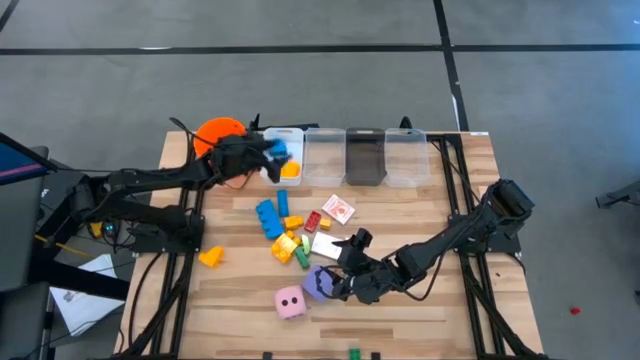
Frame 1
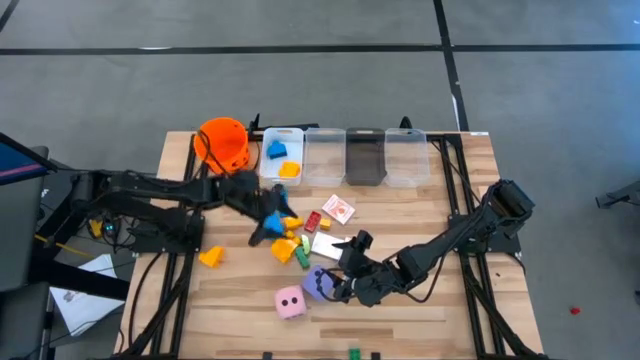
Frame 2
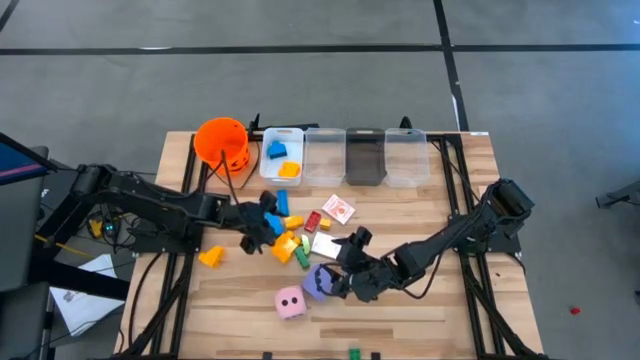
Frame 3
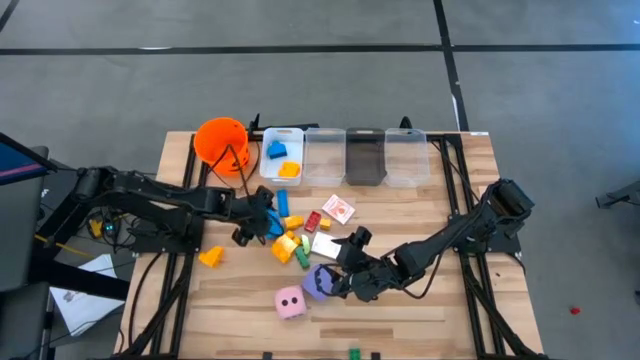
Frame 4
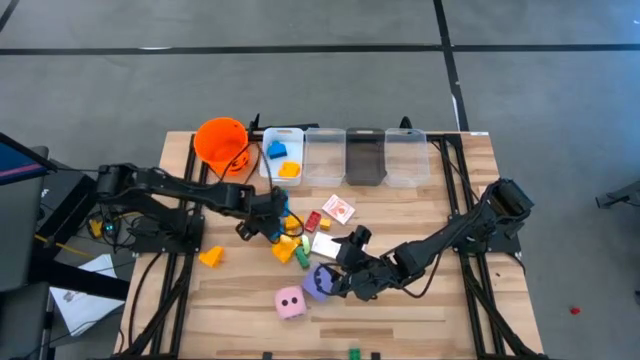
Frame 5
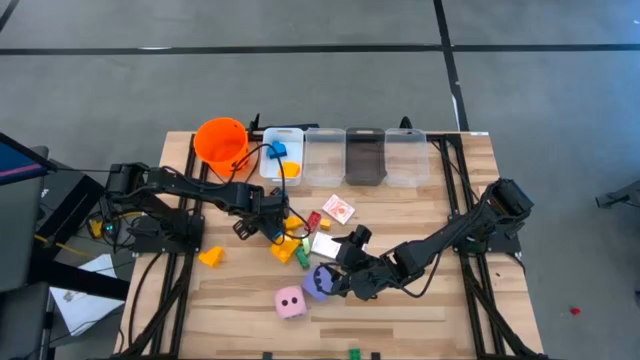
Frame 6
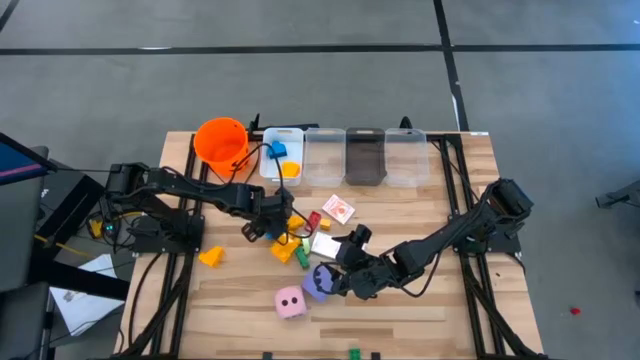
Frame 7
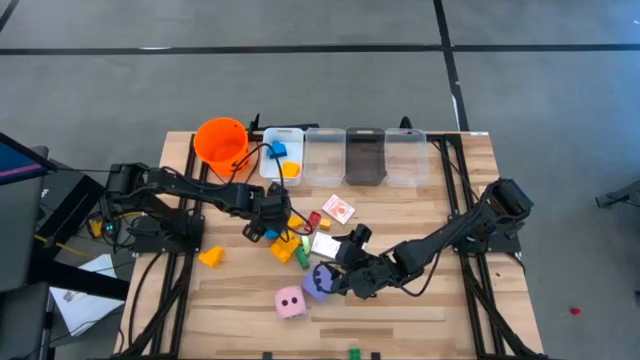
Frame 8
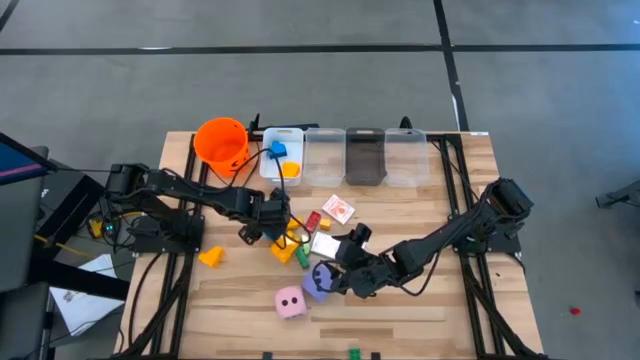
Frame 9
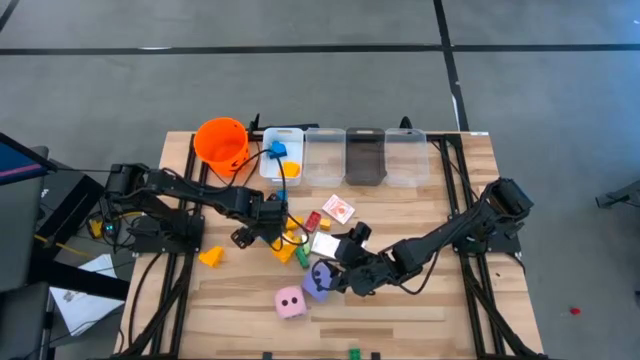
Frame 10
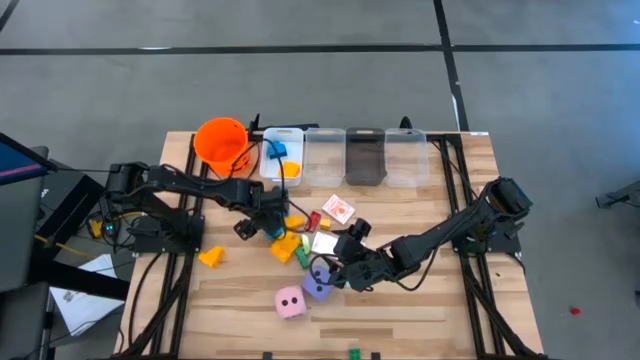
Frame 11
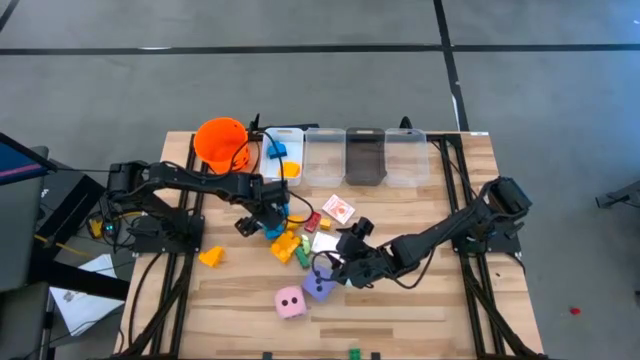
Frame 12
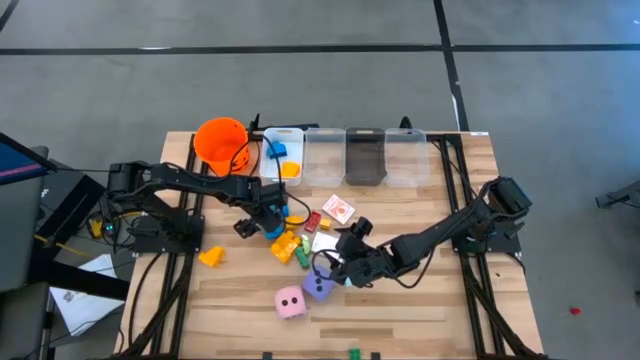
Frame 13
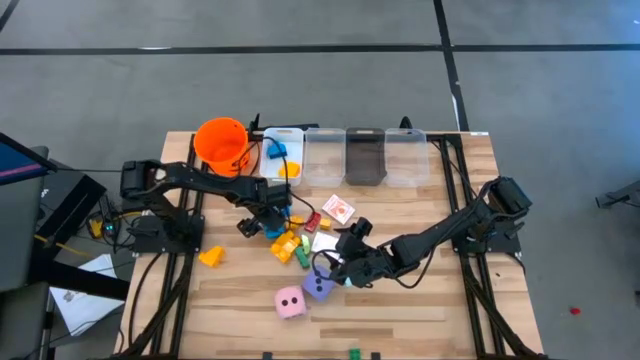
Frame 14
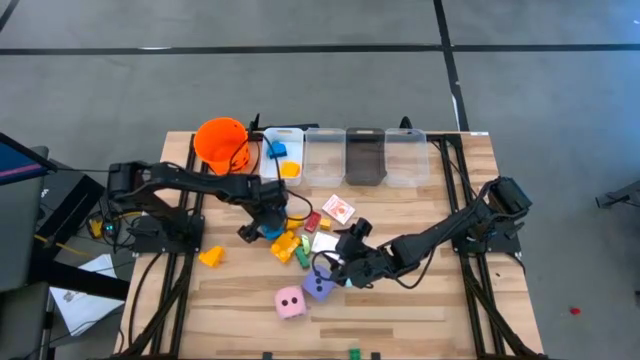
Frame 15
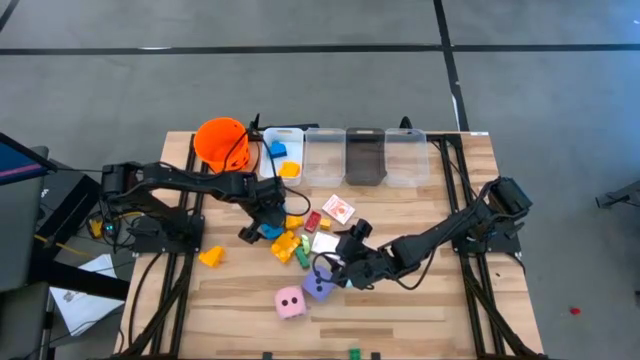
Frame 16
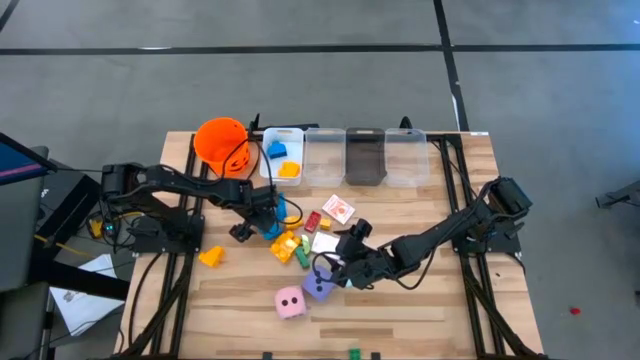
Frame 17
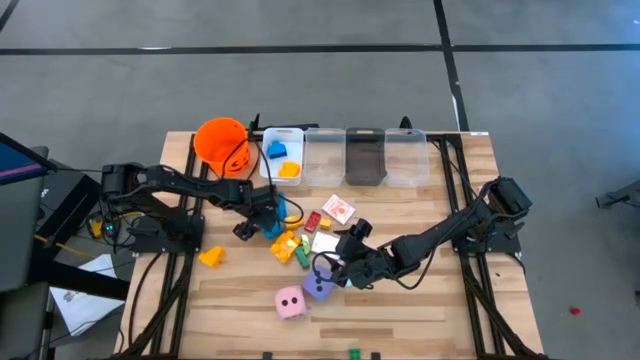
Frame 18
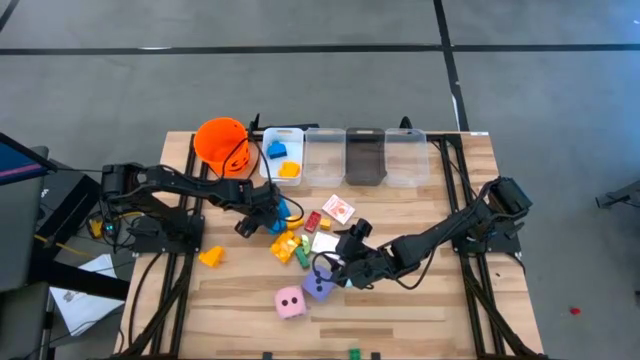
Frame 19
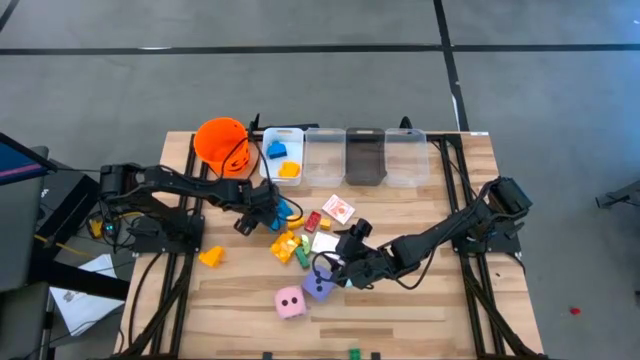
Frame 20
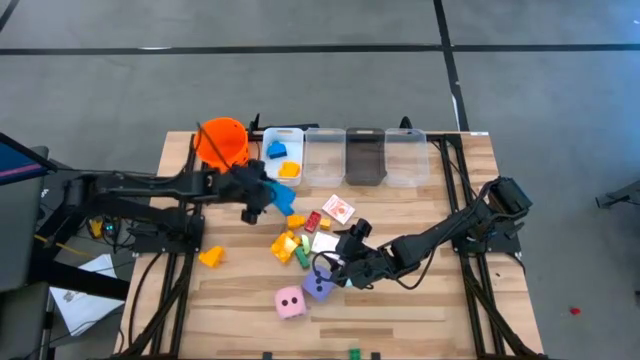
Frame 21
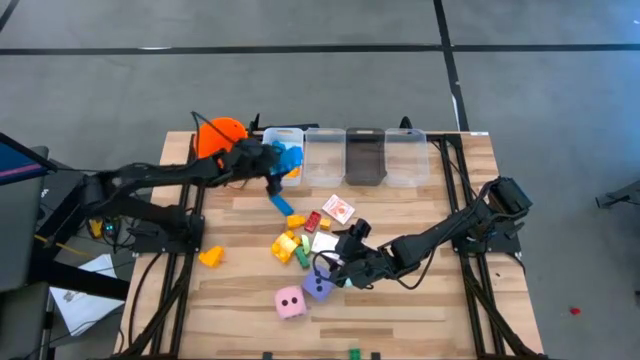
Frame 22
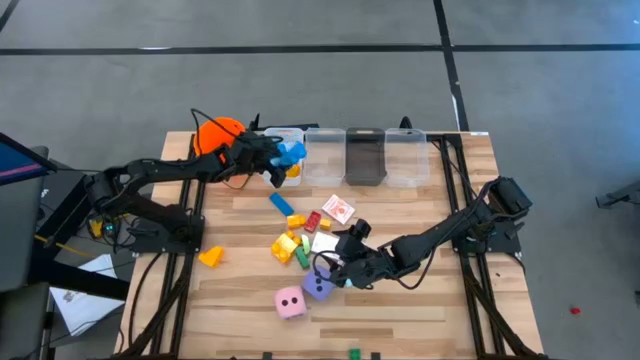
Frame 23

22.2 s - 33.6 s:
Task: Pick & Place Toys
Put the big blue game piece into the white bin

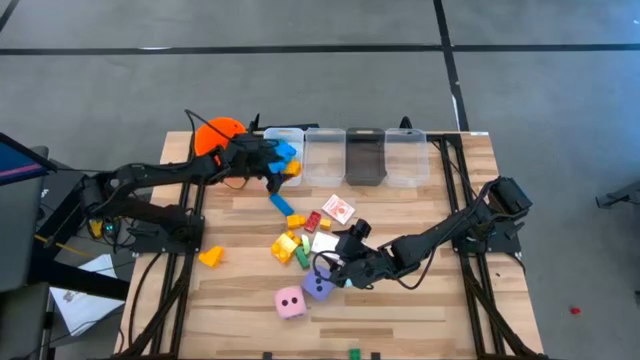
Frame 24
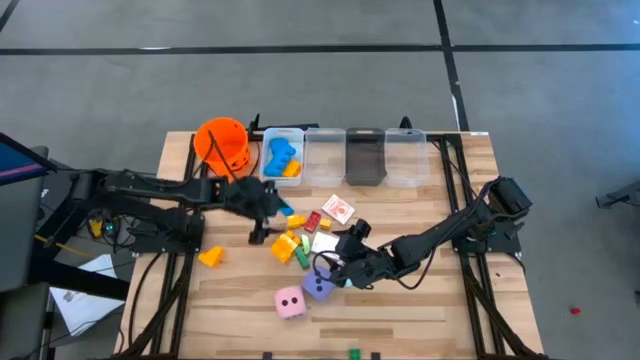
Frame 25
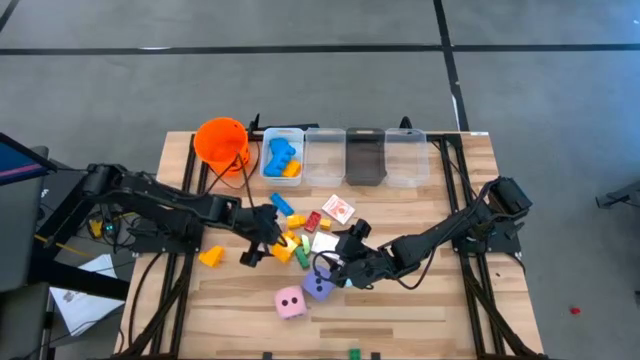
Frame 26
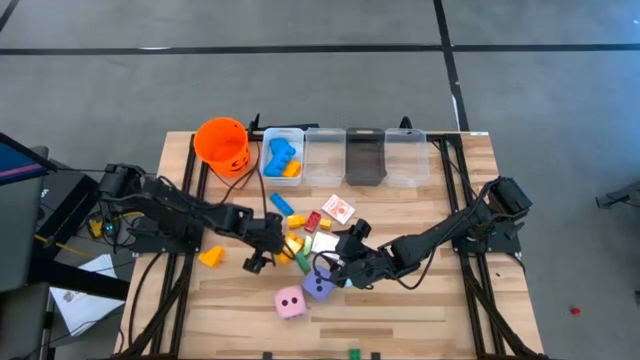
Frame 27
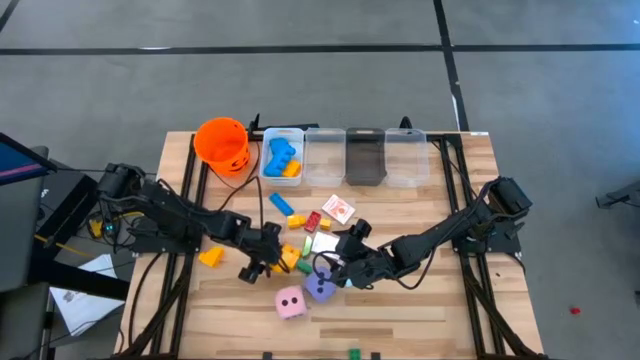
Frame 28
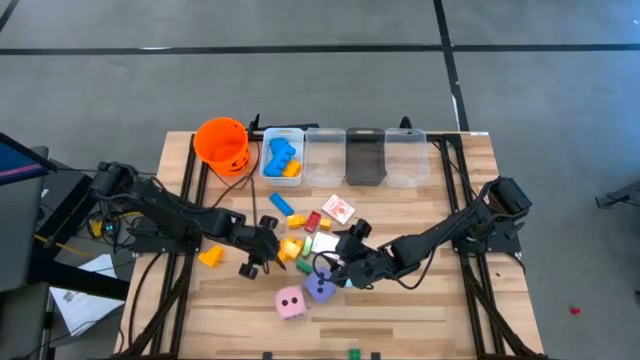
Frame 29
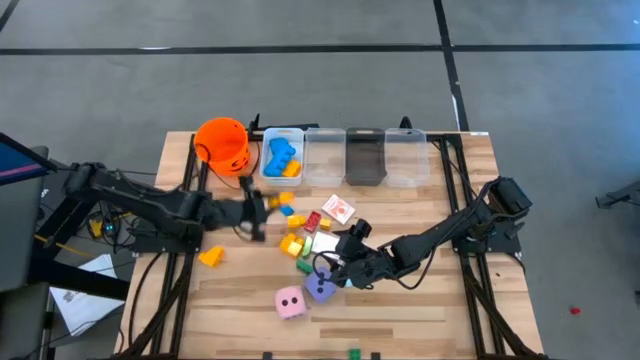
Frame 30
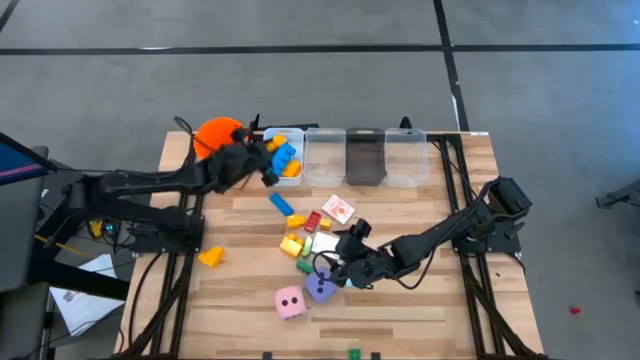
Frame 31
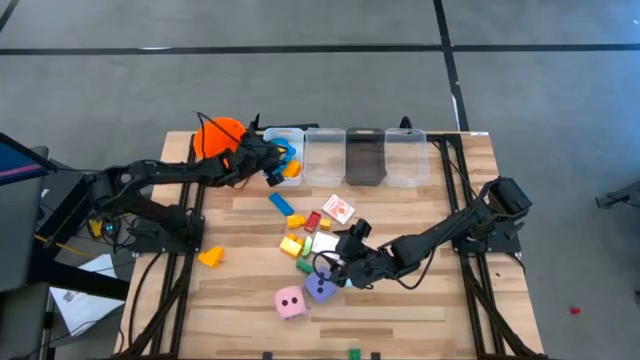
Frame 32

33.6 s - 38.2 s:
Put the big yellow game piece into the white bin

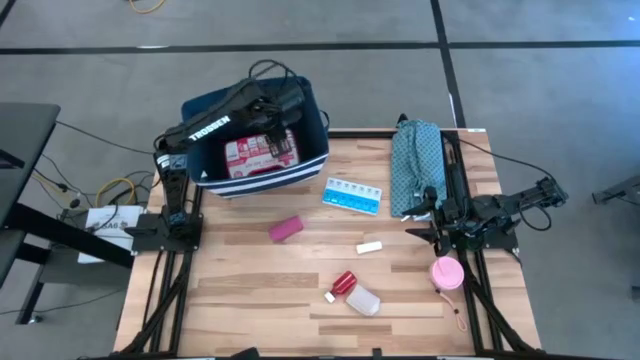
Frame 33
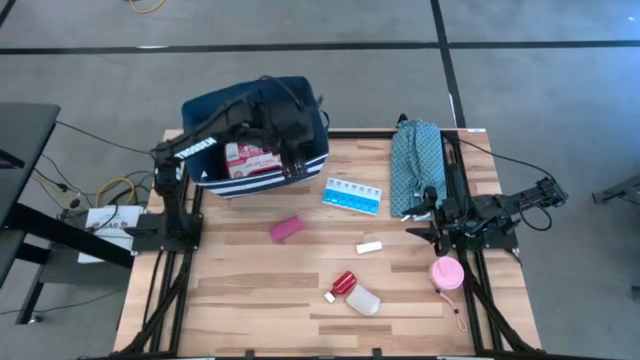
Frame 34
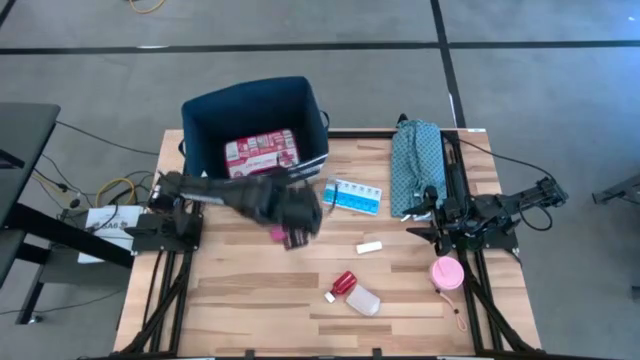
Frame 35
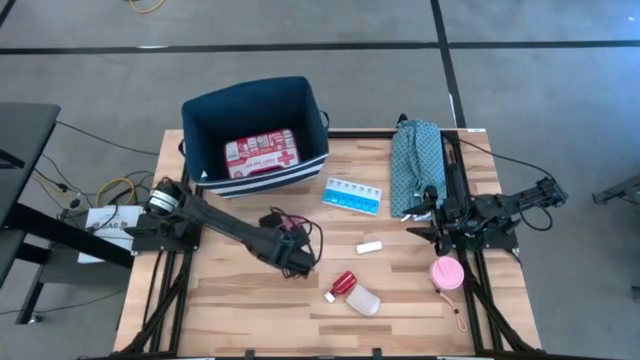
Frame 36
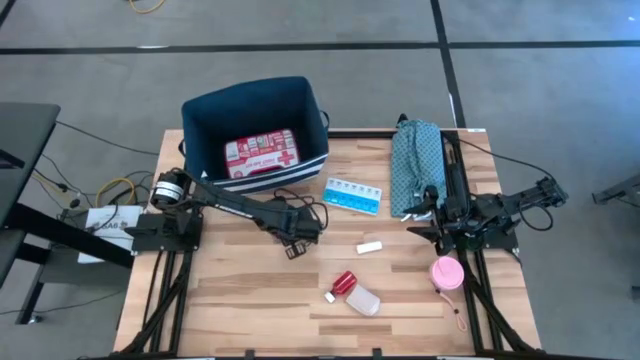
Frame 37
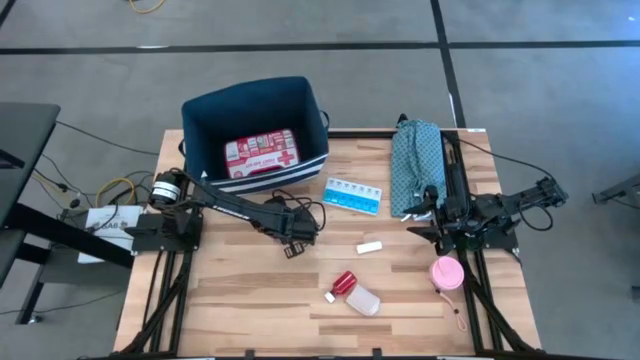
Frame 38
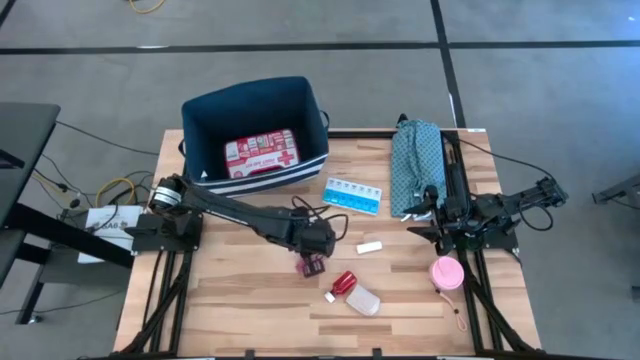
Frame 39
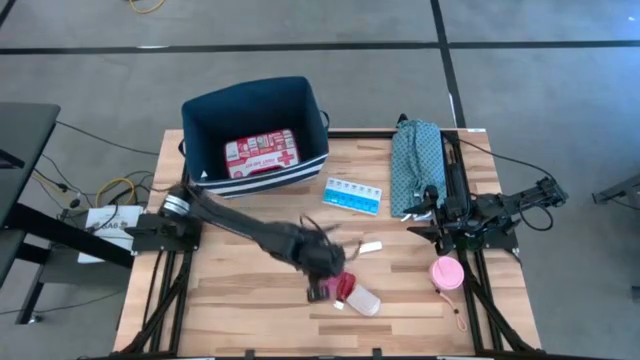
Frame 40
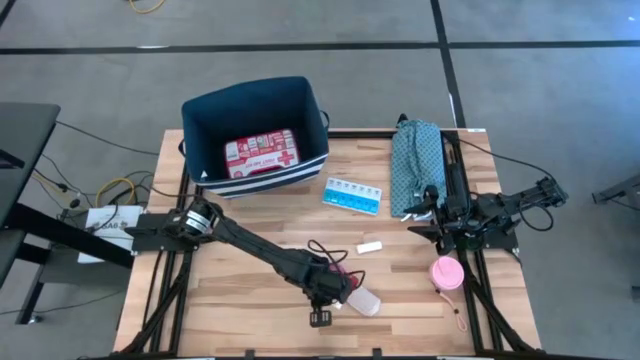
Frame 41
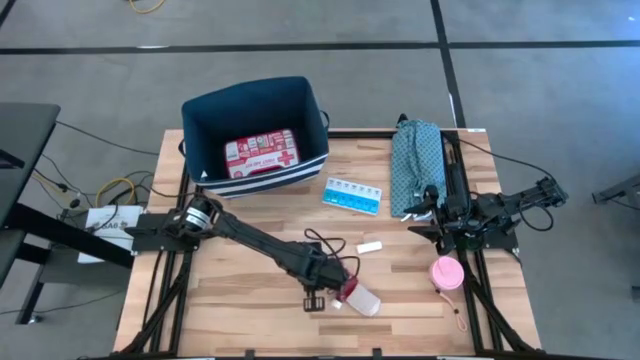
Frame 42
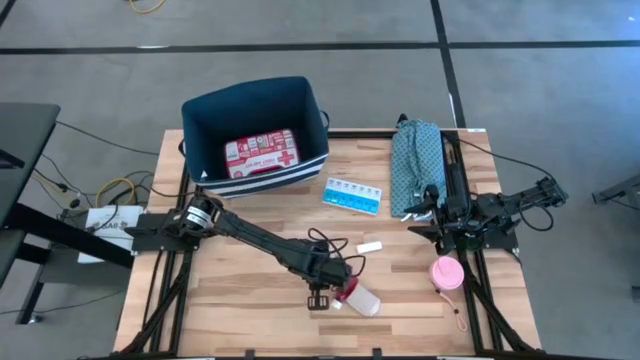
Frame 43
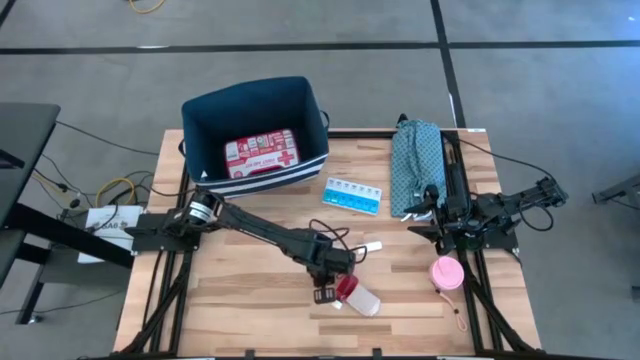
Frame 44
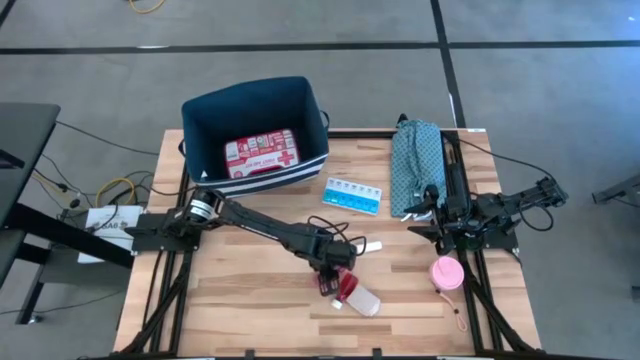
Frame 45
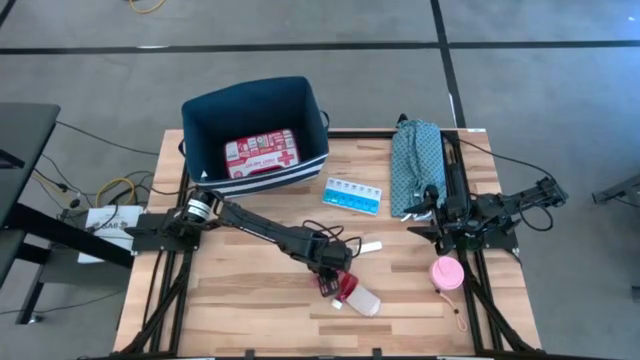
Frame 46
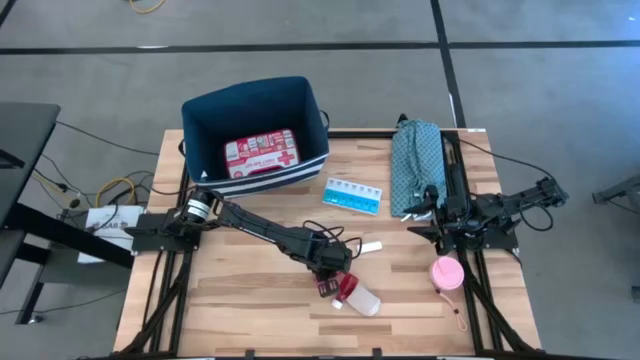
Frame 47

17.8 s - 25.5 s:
Task: Pick & place medical supplies in basket/bin
Put the pink bandage into the blue bin
